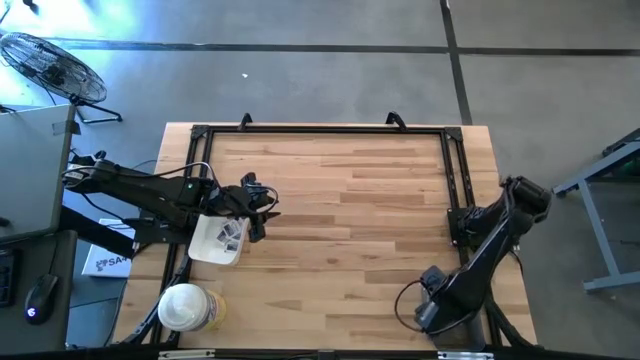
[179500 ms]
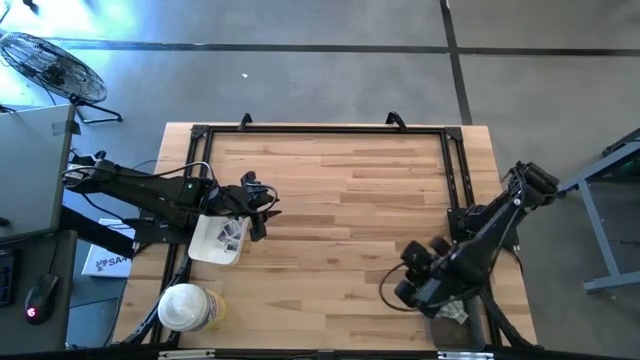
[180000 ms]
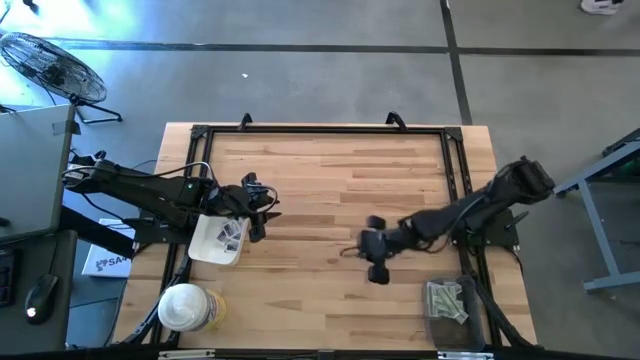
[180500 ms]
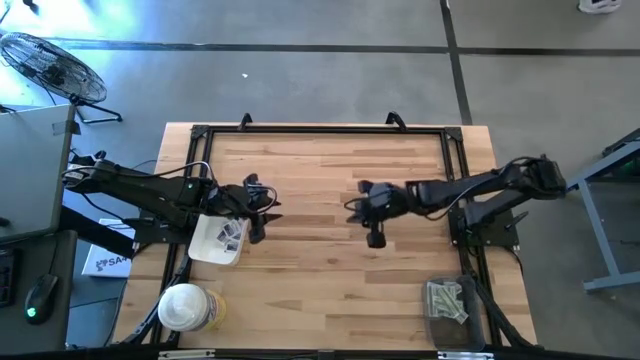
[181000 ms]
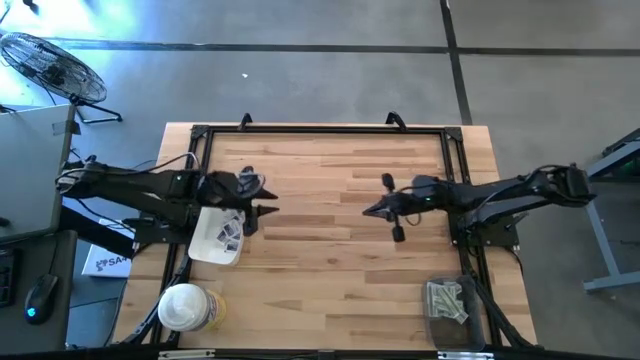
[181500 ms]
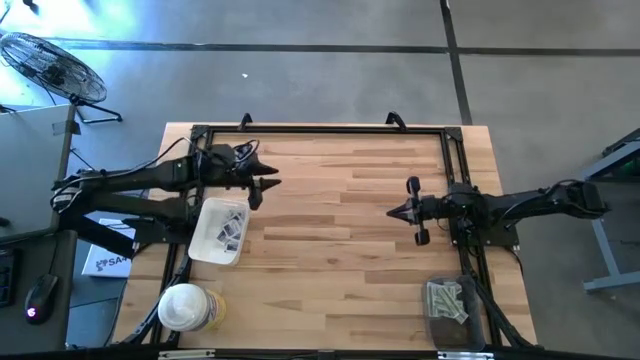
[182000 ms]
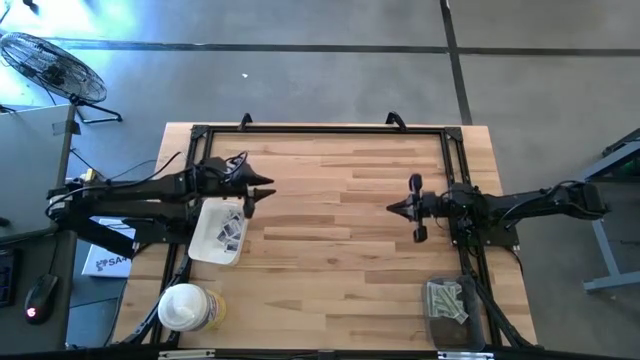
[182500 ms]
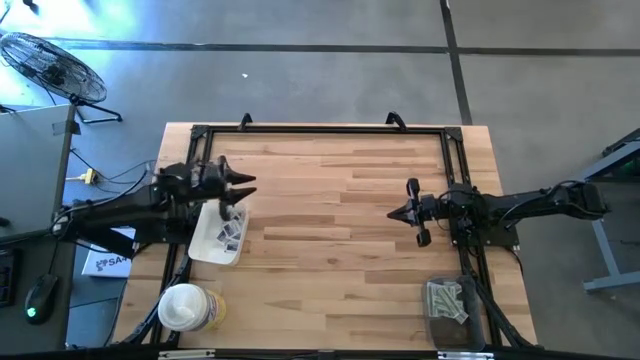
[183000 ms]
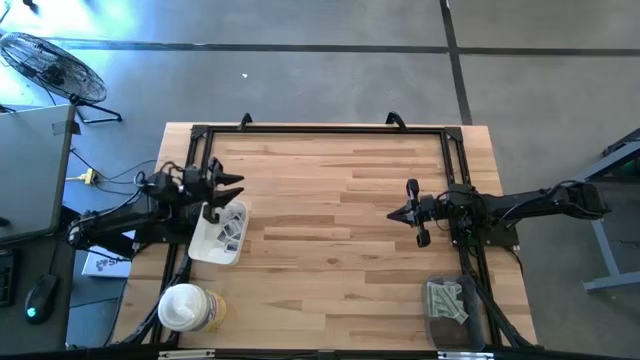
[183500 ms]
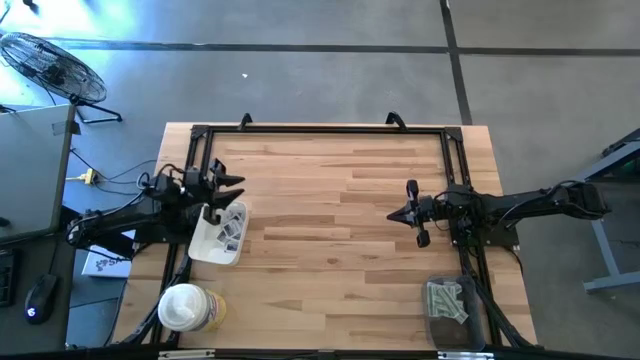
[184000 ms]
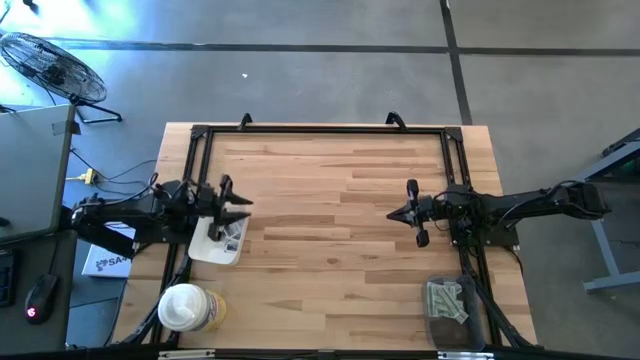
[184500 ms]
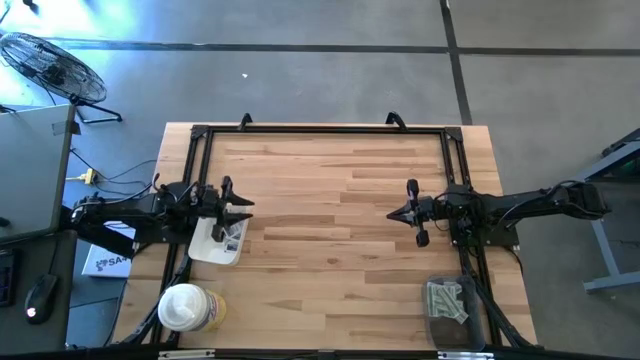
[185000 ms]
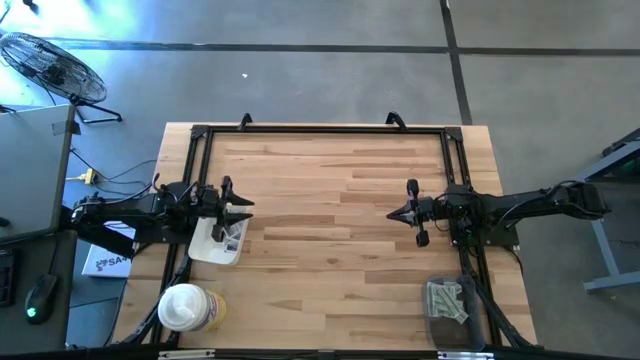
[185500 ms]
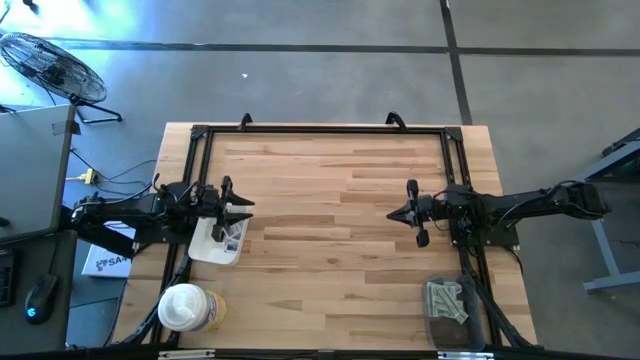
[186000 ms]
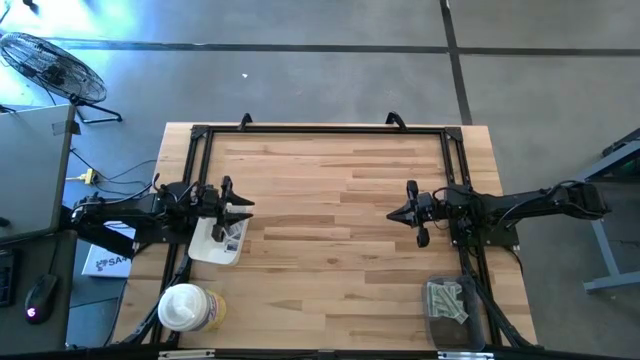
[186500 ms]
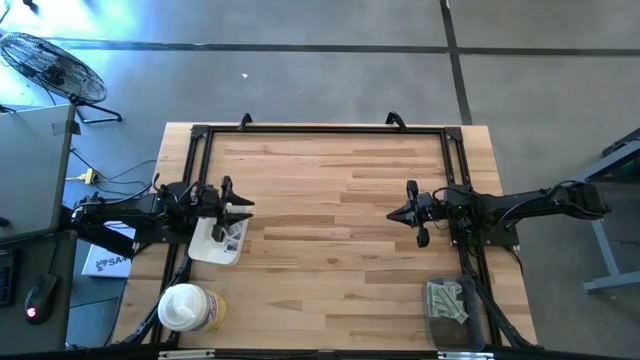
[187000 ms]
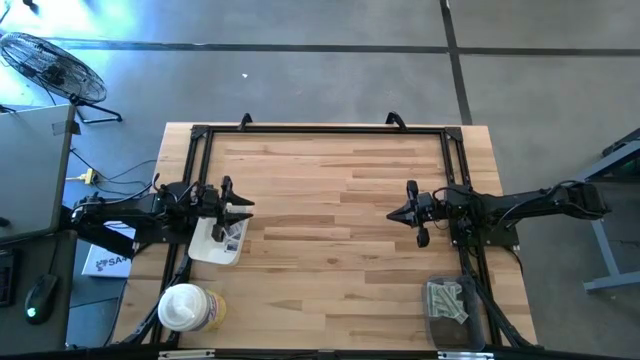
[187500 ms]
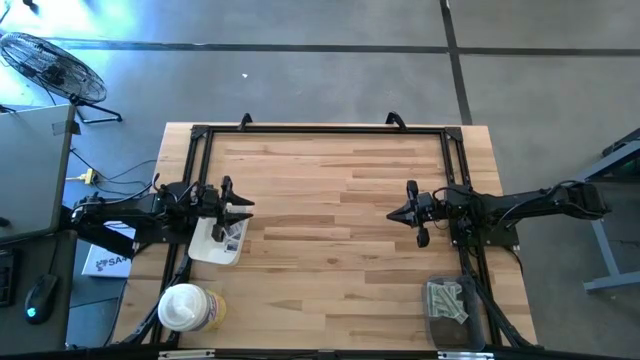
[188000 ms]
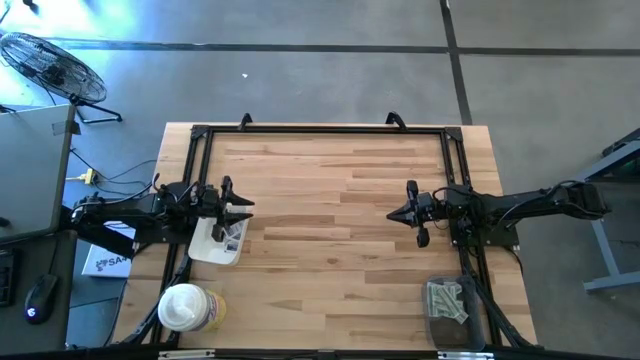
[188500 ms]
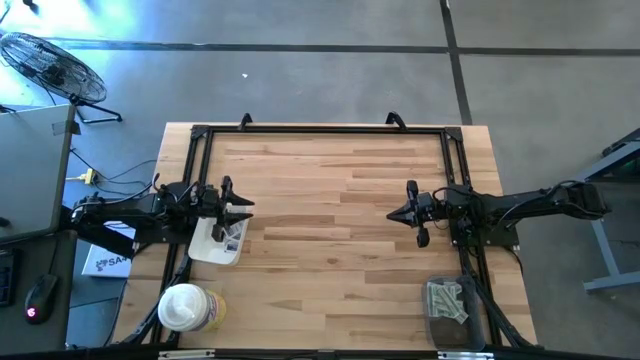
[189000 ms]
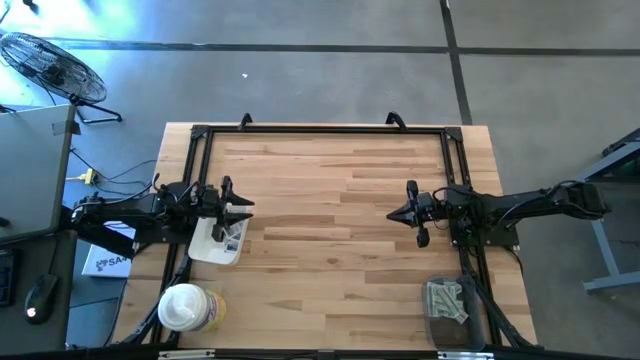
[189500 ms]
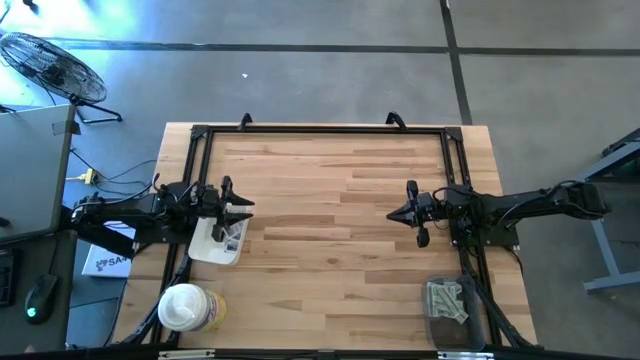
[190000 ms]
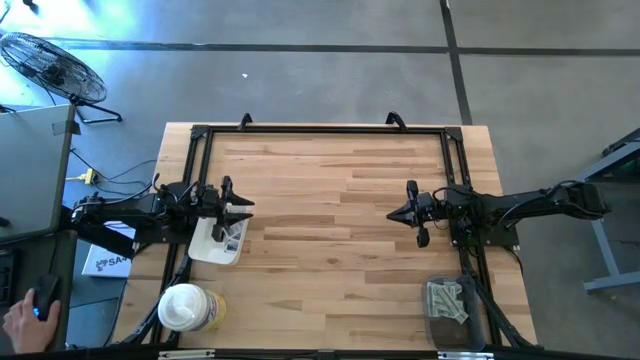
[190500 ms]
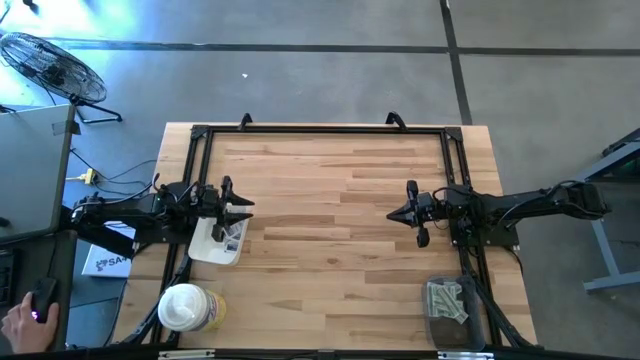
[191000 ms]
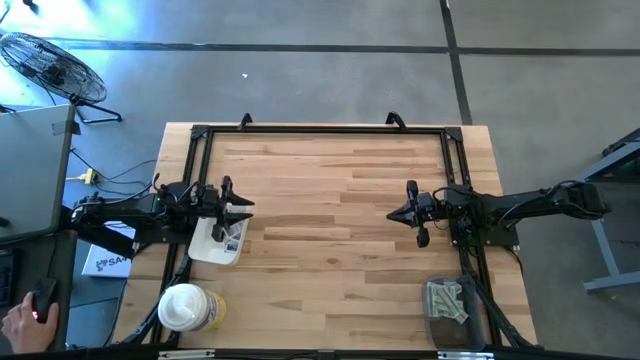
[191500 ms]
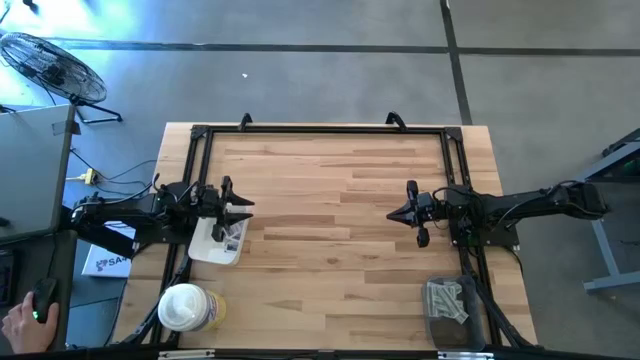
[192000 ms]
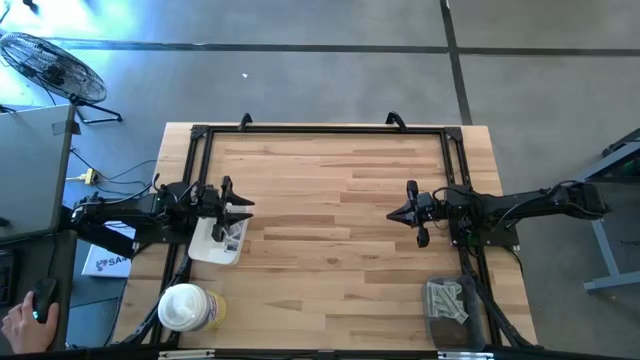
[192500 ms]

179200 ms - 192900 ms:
Task: Pick & Place First Aid Supplies
Return to Home Position

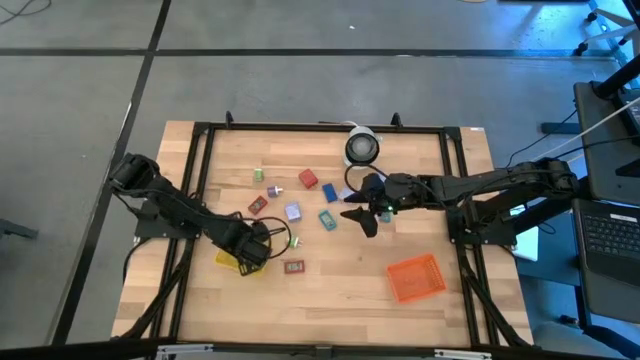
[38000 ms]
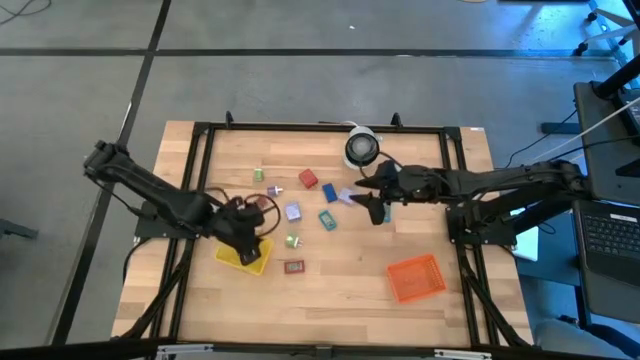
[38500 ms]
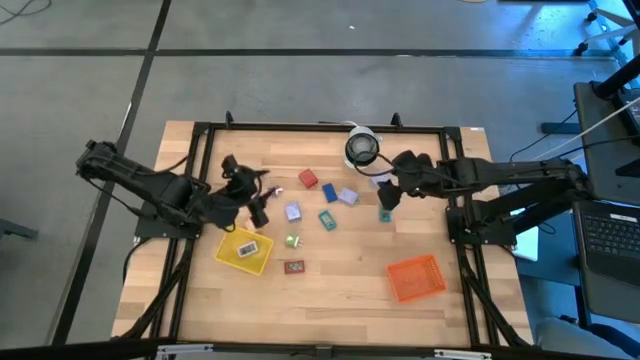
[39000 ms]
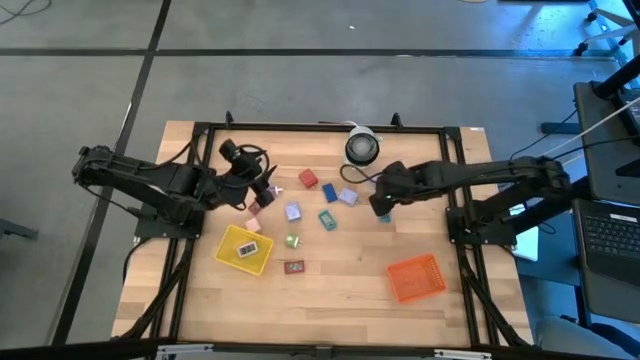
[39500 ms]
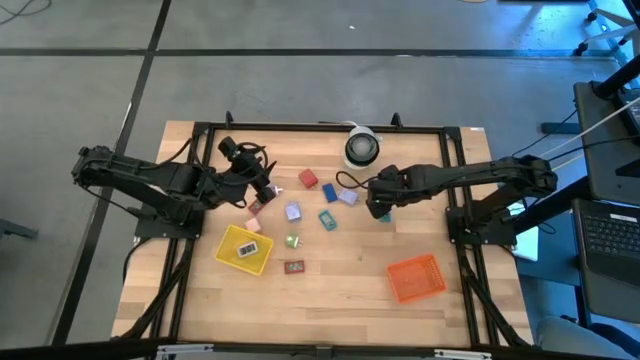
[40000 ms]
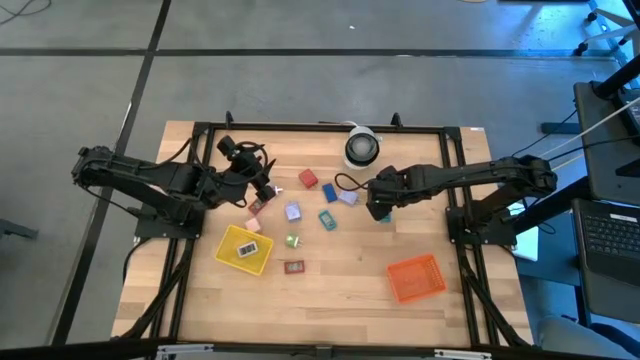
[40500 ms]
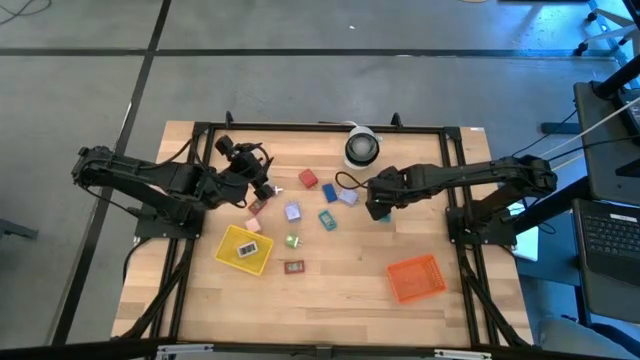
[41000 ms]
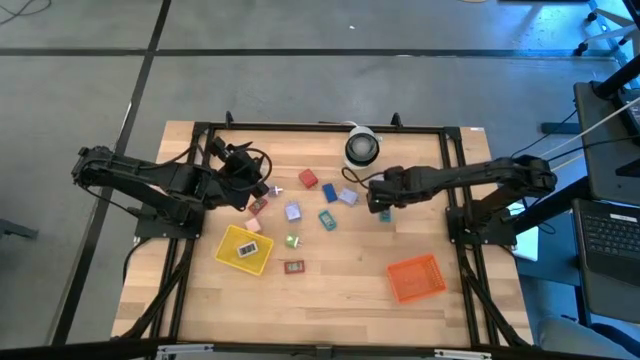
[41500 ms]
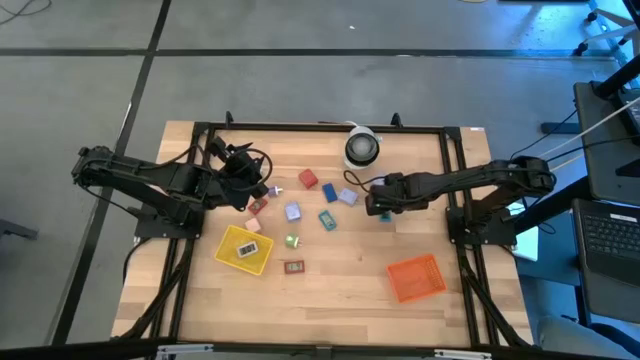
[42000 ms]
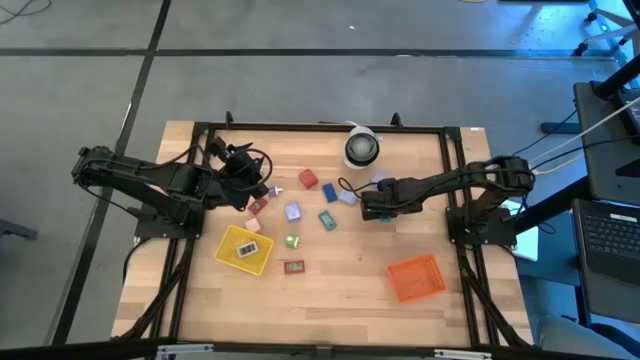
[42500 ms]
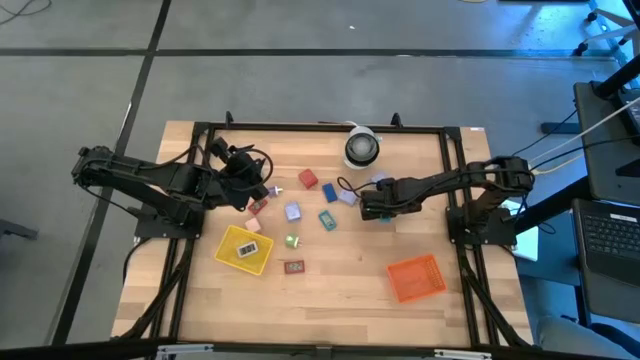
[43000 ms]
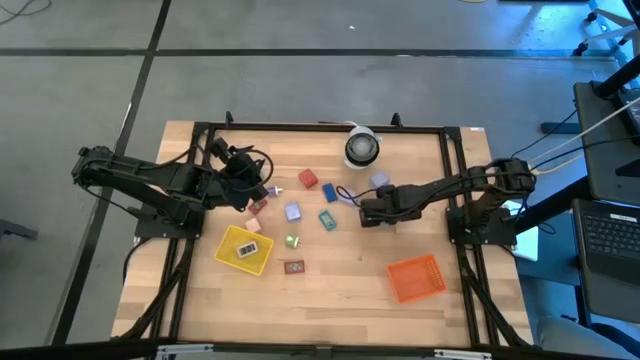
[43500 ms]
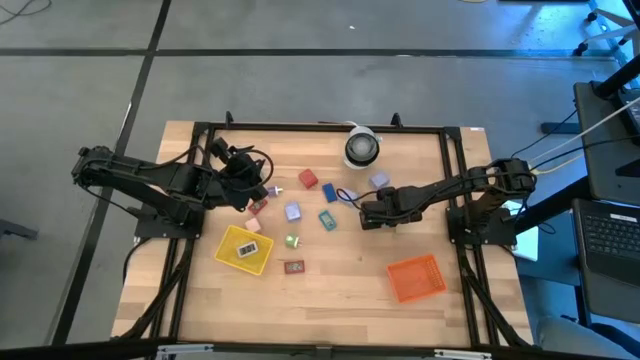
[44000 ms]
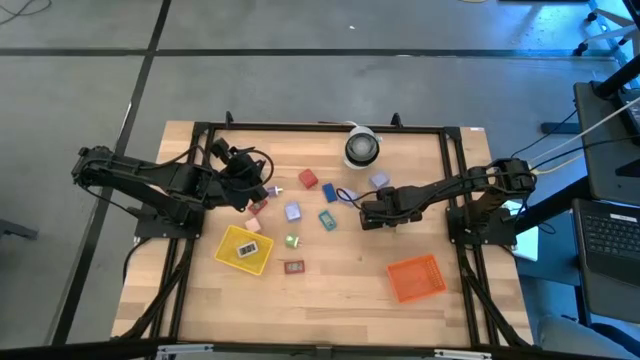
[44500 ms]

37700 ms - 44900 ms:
Task: Pick & Place Office items
Put the right light blue digital timer into the yellow bin
